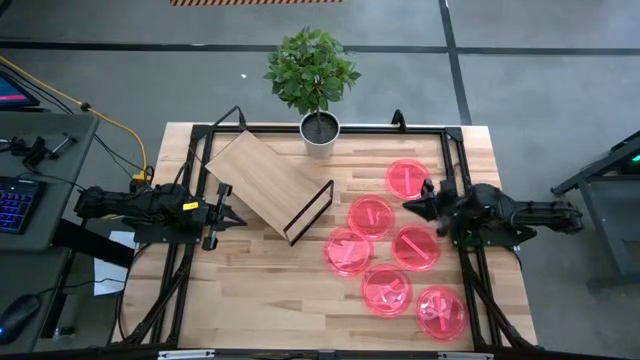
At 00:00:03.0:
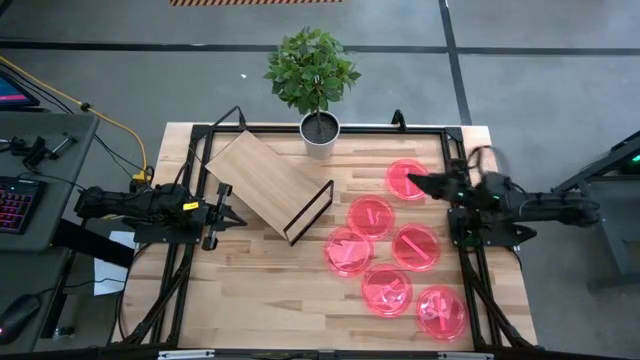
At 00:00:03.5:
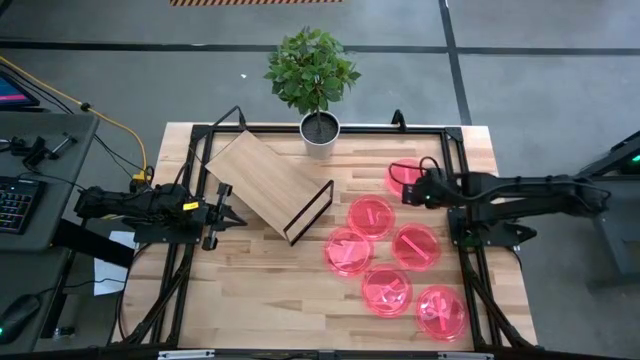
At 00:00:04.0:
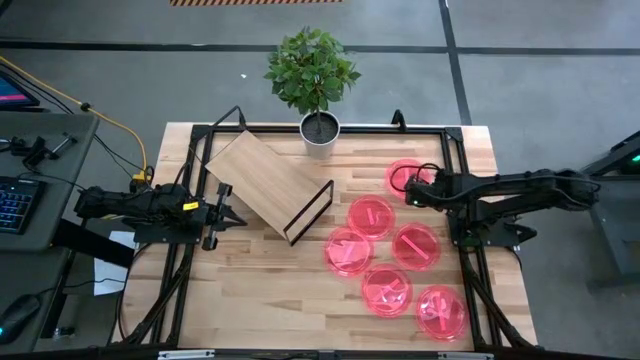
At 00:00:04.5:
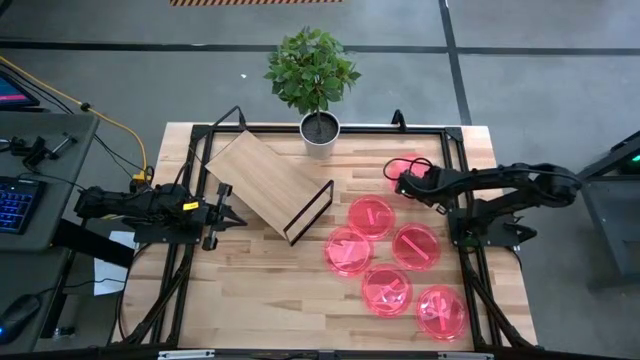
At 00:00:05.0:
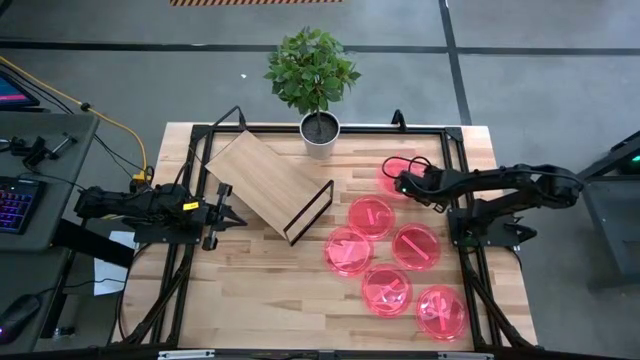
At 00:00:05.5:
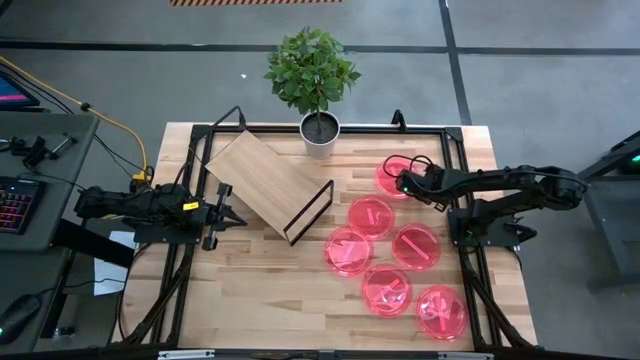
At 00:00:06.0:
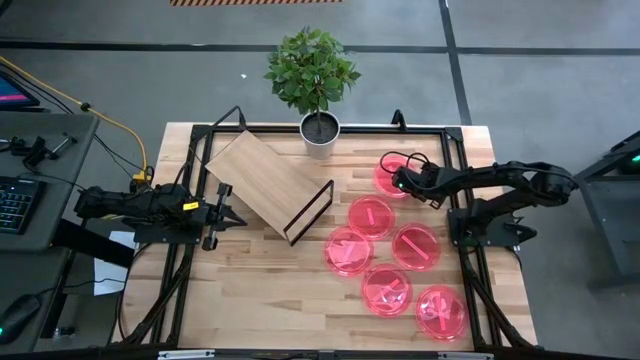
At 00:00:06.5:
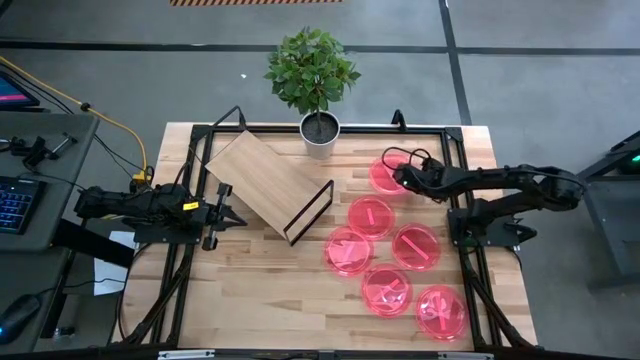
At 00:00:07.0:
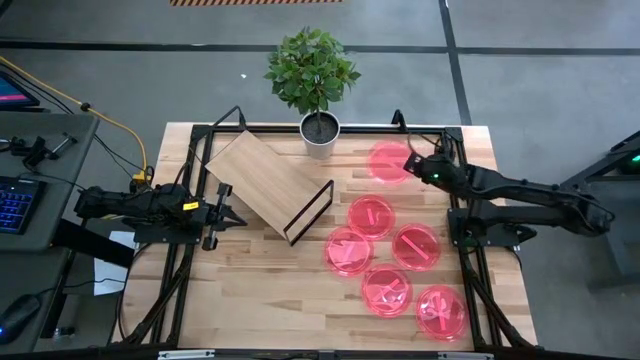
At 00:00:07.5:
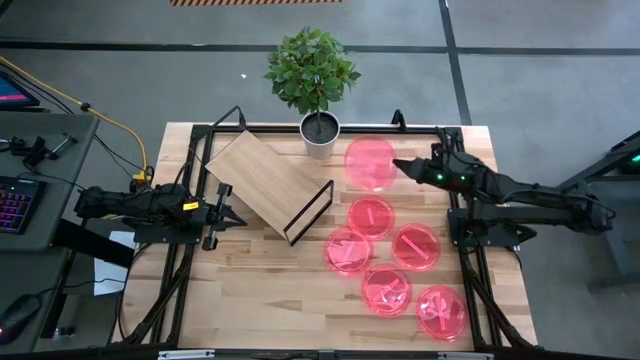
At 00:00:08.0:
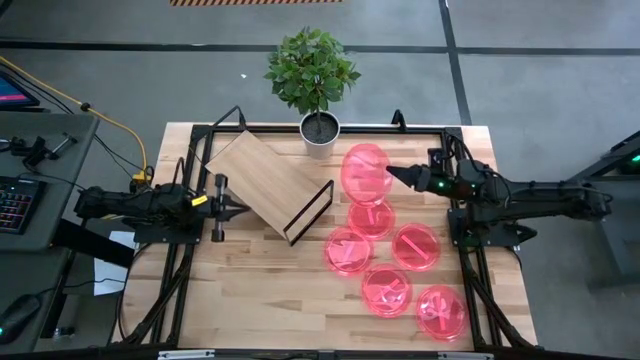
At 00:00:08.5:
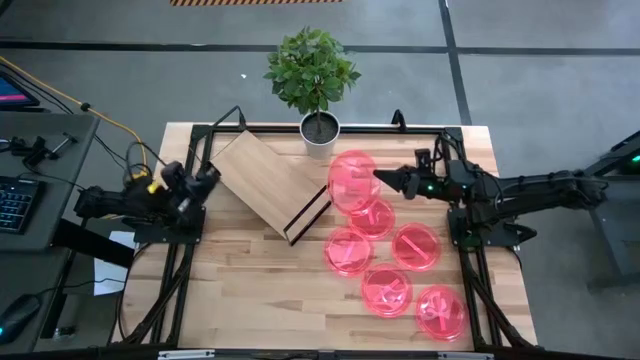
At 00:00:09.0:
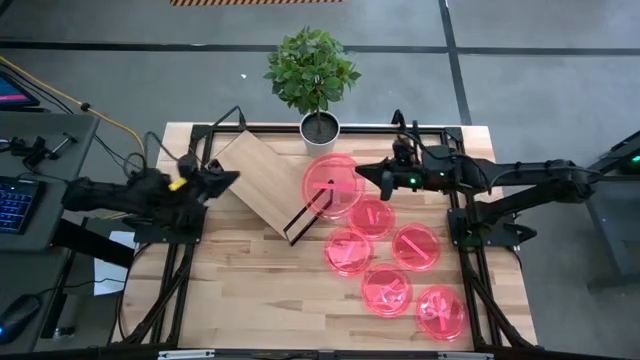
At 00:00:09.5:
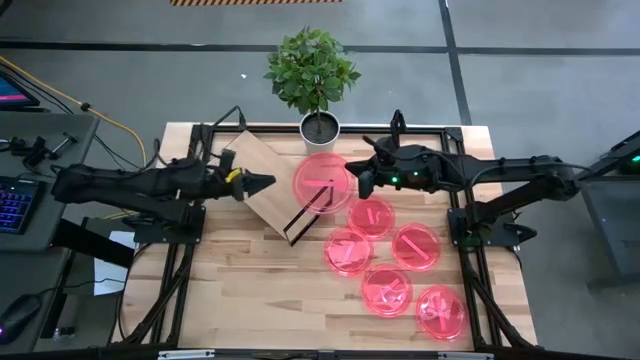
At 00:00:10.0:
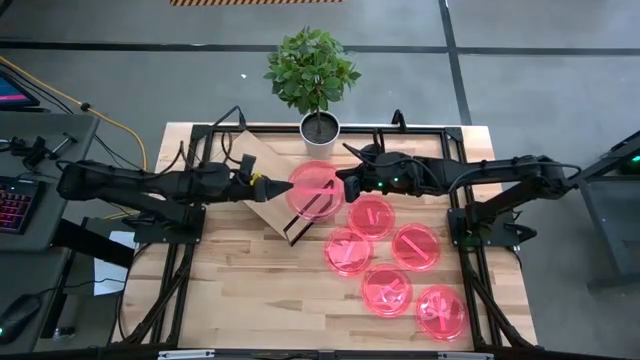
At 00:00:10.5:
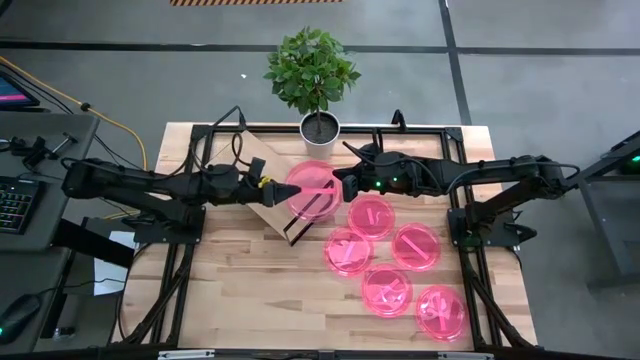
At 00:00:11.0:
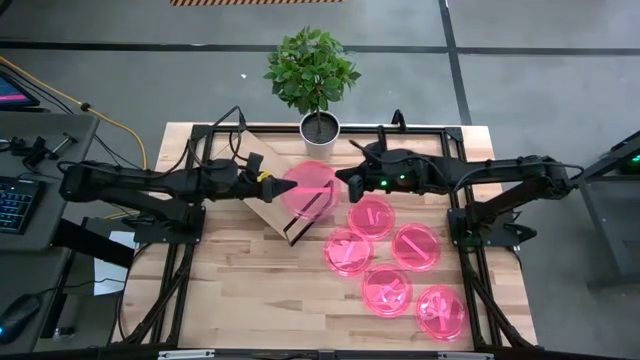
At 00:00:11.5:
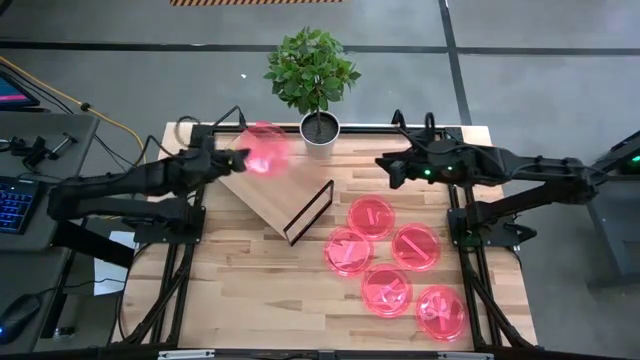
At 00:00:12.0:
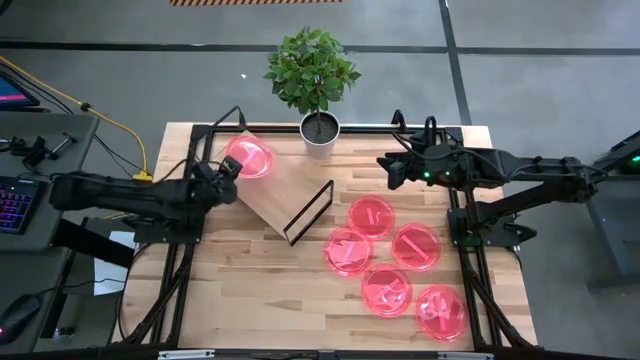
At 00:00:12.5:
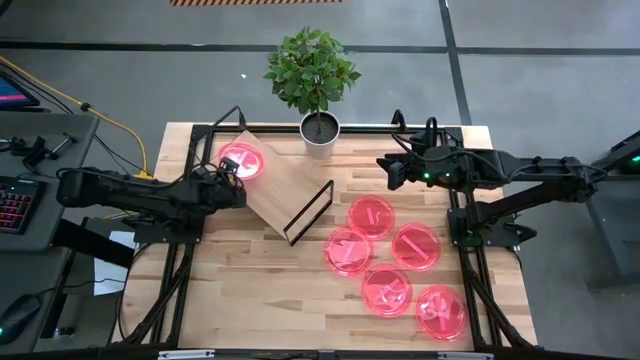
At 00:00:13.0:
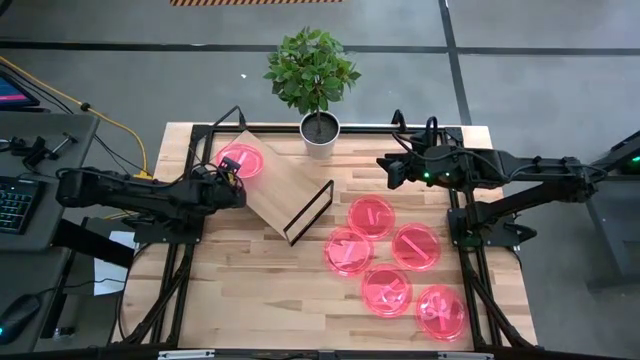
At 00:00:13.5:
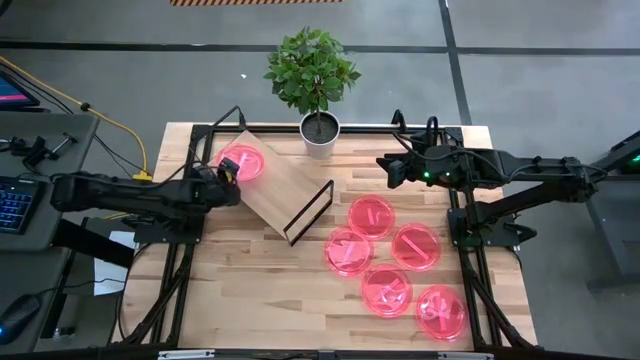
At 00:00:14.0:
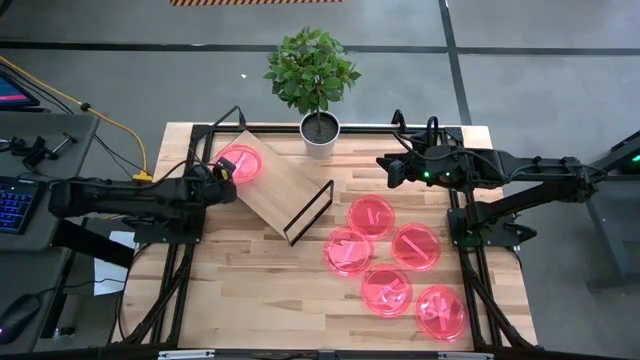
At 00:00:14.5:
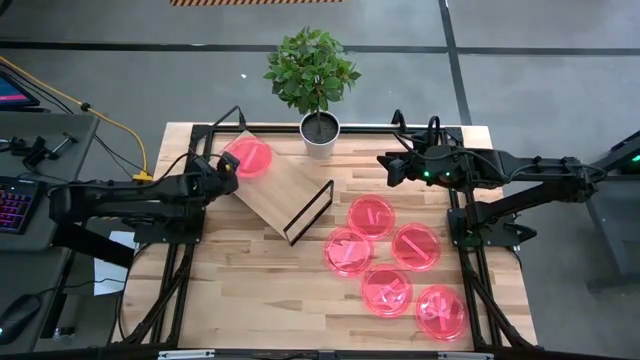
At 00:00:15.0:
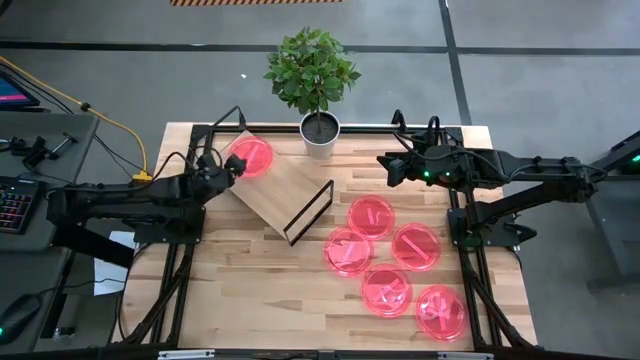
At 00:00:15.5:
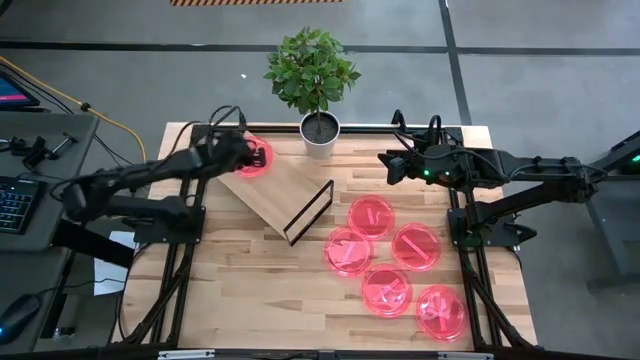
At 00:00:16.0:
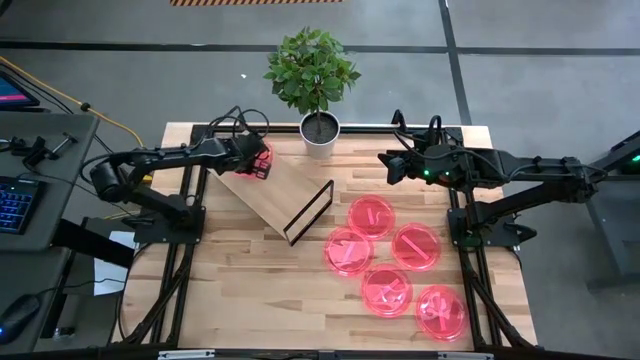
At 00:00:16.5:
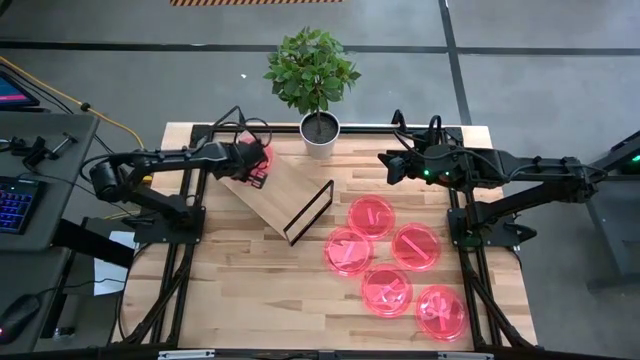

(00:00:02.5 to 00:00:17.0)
Task: Place and stack plates onto a shelf
Put the pink plate on the shelf
